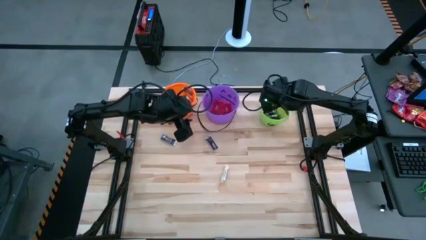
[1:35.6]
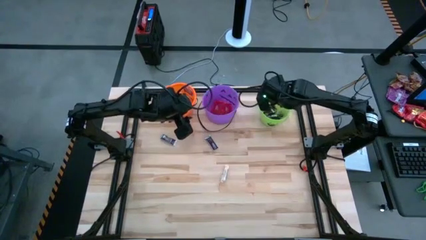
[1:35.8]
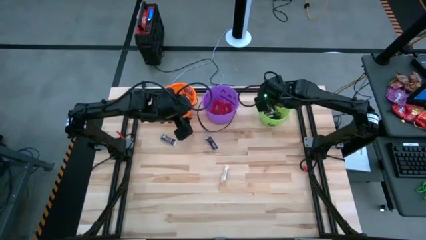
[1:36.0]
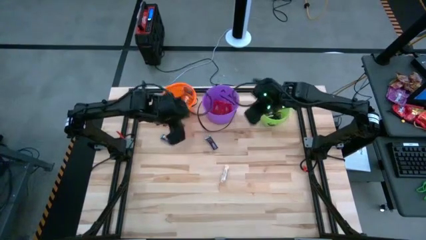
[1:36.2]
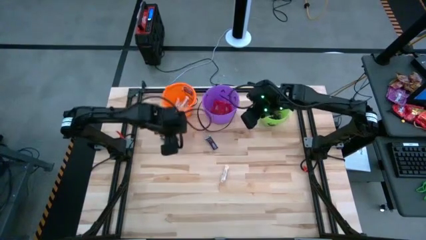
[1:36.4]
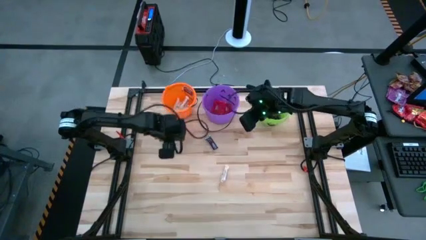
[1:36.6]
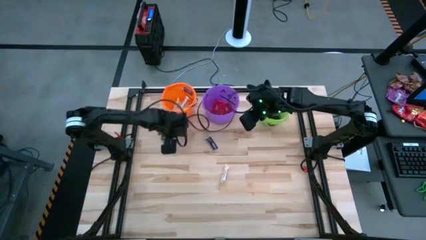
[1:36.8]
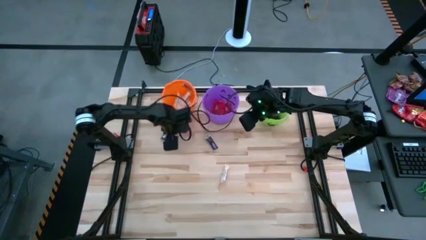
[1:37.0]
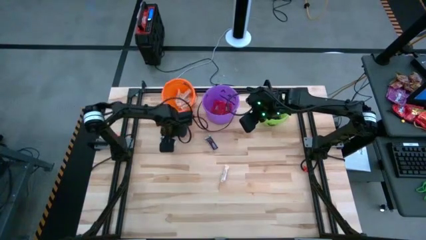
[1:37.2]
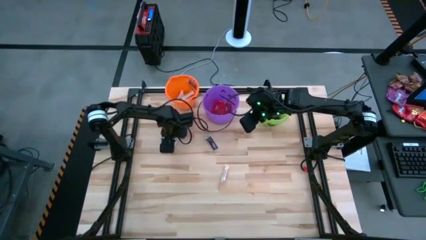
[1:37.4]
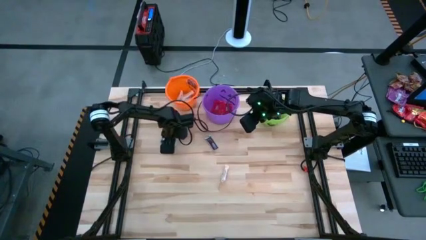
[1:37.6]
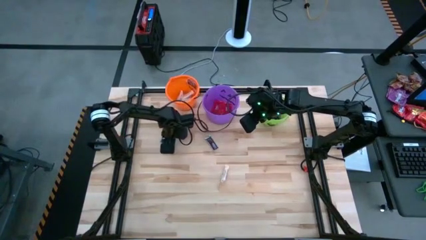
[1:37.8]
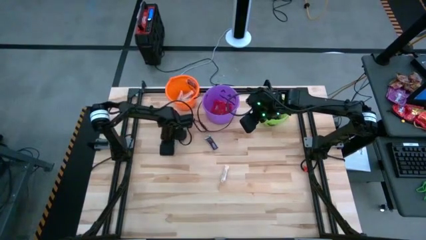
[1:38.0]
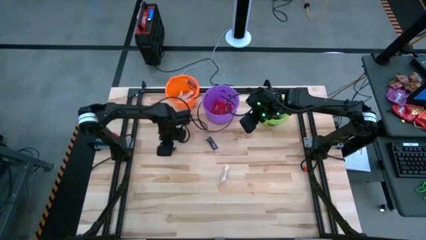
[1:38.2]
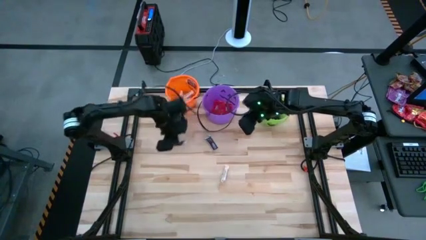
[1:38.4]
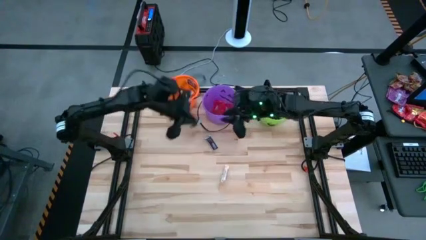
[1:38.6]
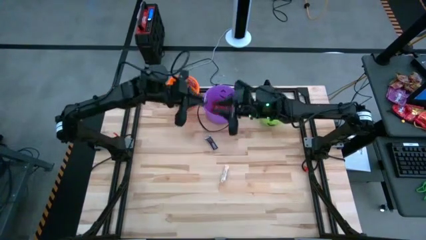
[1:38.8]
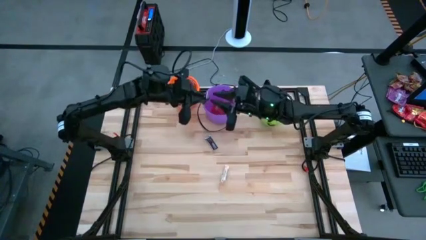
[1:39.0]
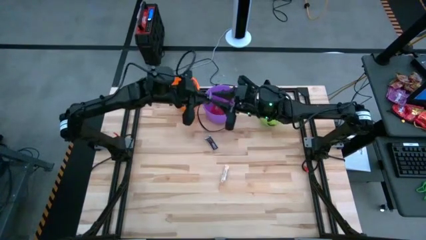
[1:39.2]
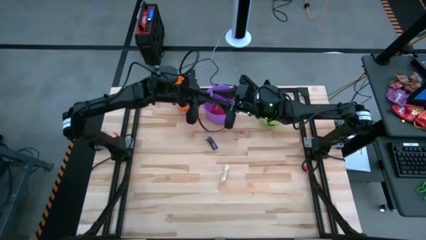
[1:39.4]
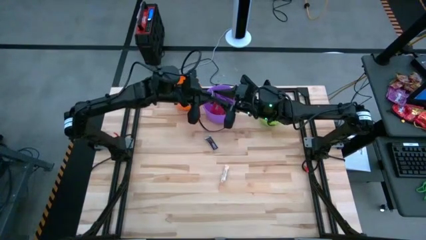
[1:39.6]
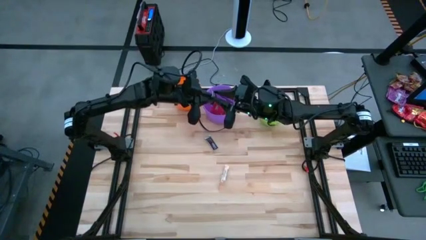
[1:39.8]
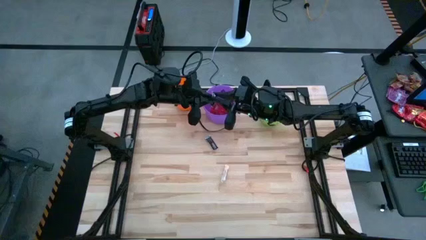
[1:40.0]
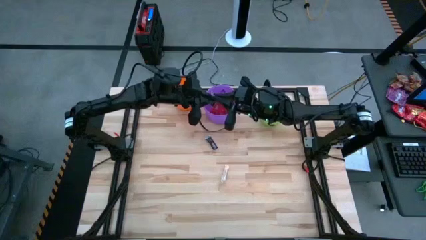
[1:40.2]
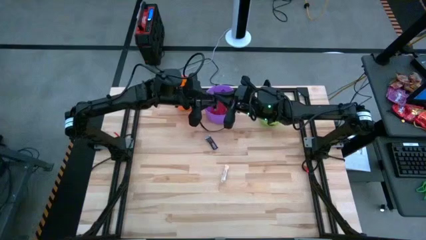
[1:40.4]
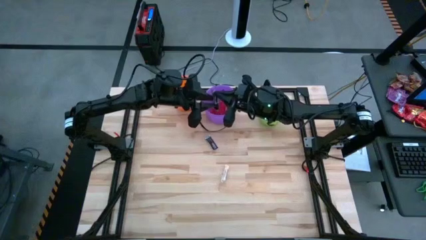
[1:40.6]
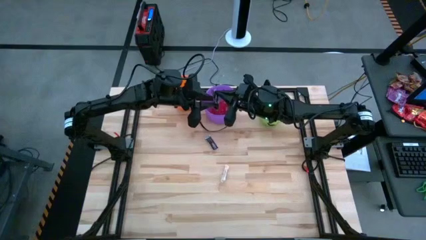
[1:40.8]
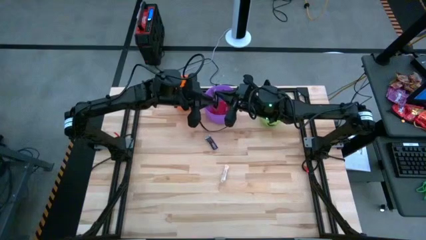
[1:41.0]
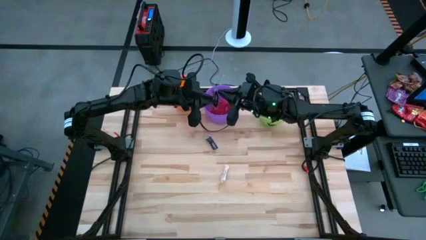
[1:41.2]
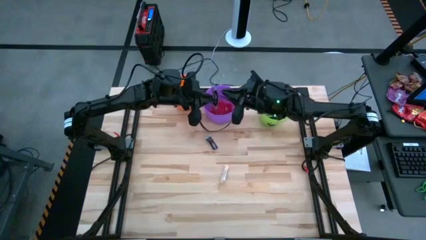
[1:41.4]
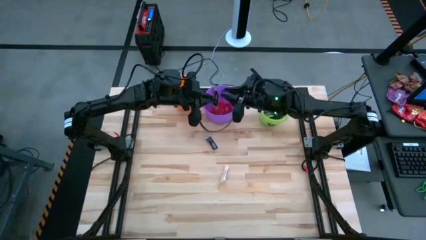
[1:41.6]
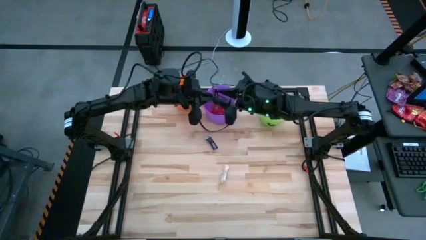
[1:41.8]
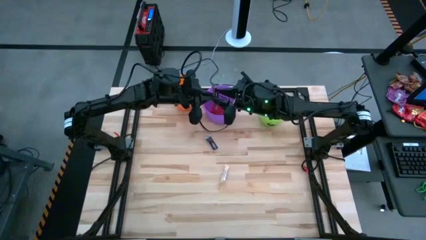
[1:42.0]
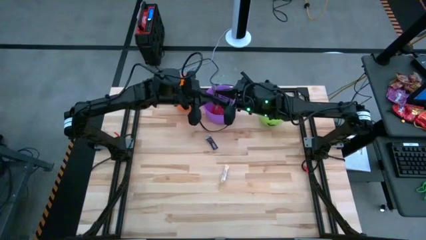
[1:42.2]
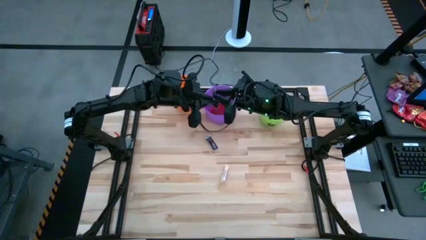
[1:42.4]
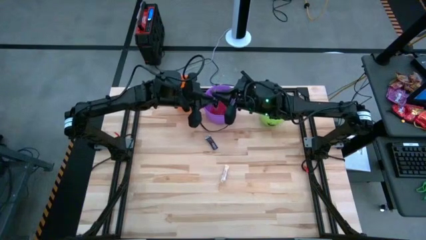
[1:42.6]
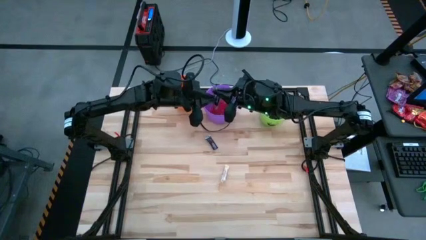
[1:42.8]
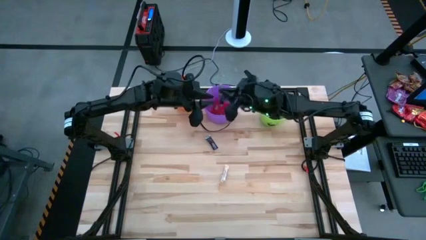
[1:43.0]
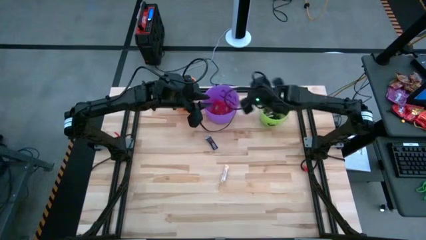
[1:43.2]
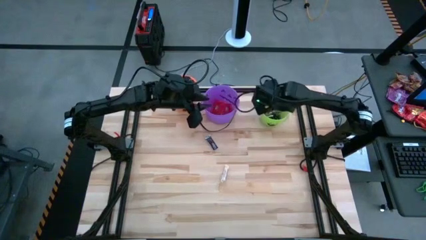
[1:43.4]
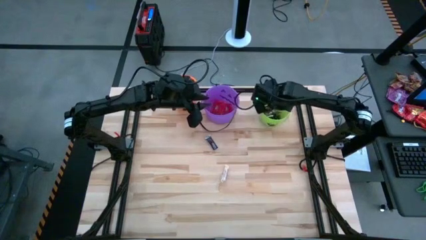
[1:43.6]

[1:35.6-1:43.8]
Task: Sort candy by brand, put in halloween buckets
Put the brown chocolate bar into the green bucket

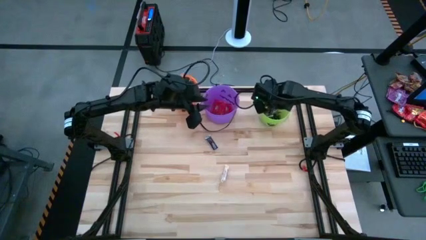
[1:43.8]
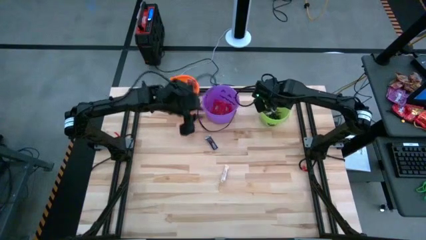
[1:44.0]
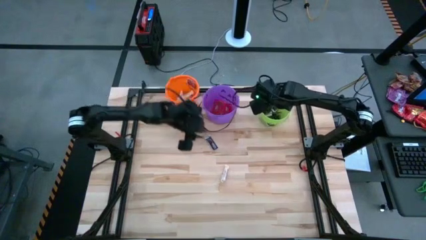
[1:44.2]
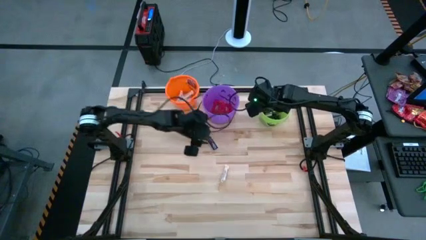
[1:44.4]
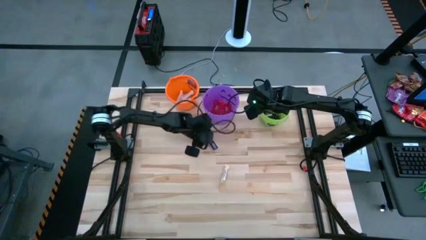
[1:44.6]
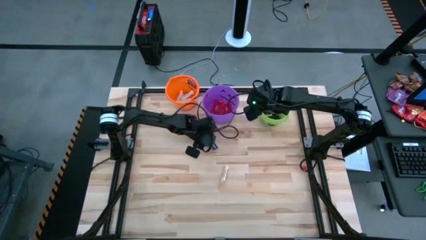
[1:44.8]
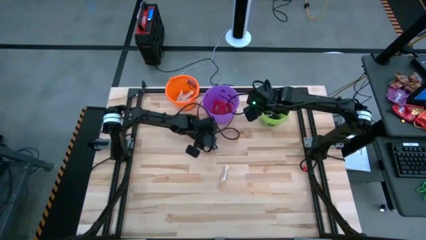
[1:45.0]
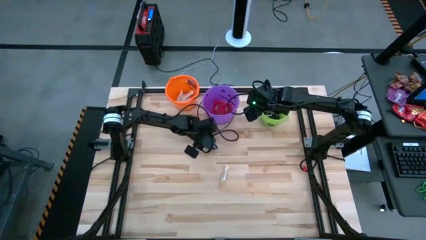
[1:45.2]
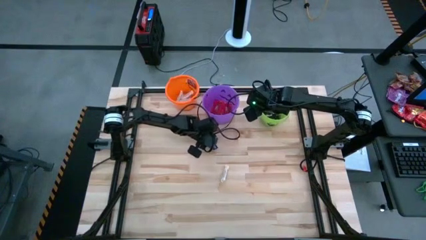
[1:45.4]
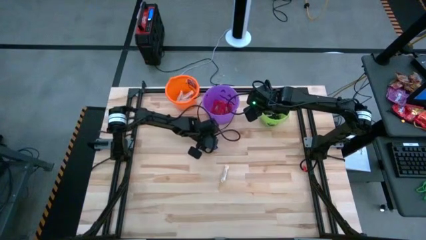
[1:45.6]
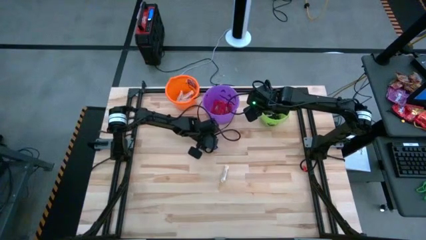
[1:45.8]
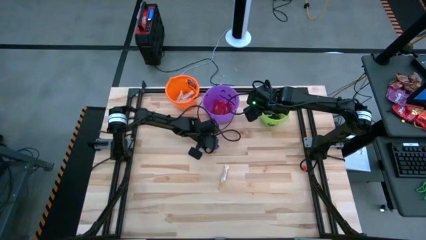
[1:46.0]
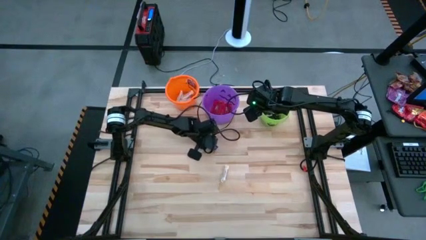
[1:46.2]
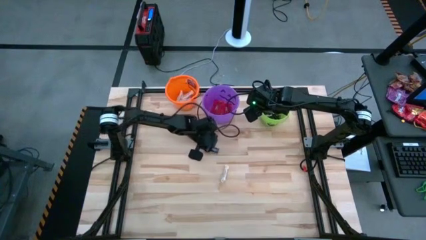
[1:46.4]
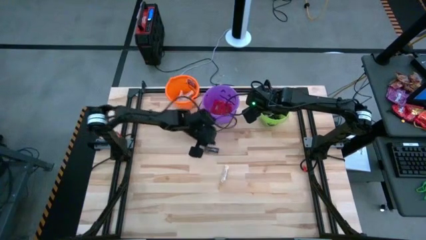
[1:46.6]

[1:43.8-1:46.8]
Put the brown chocolate bar into the green bucket

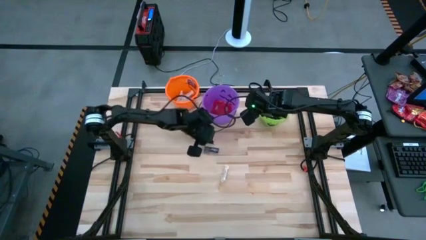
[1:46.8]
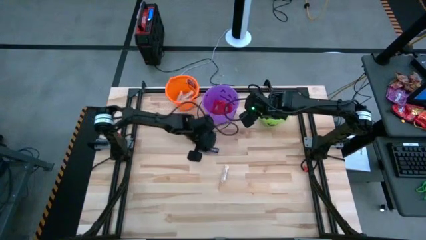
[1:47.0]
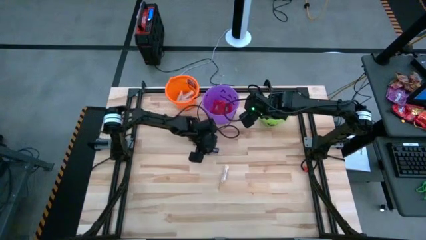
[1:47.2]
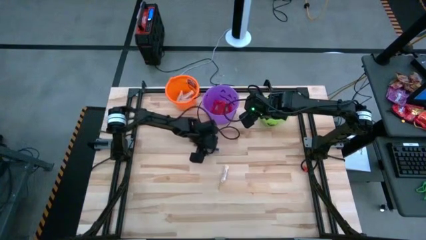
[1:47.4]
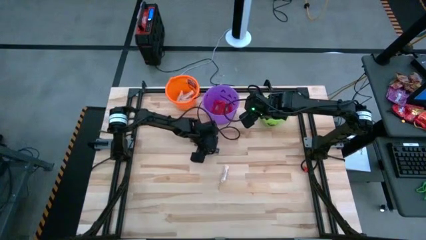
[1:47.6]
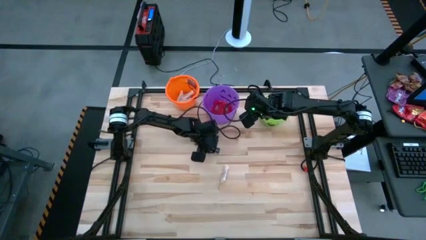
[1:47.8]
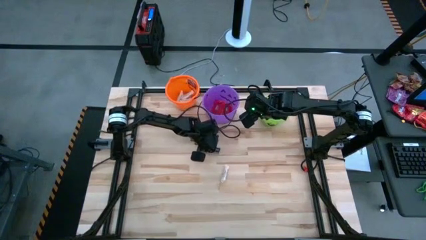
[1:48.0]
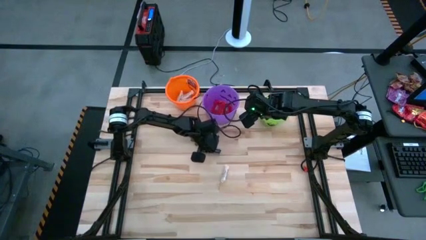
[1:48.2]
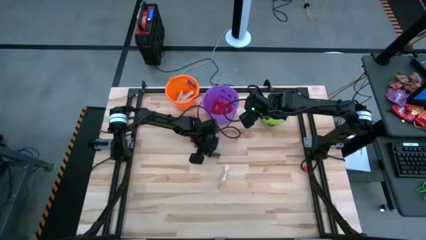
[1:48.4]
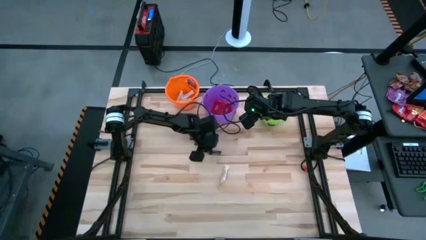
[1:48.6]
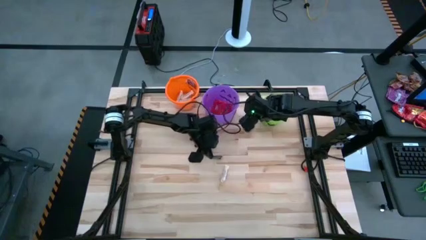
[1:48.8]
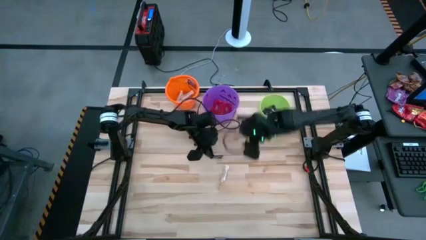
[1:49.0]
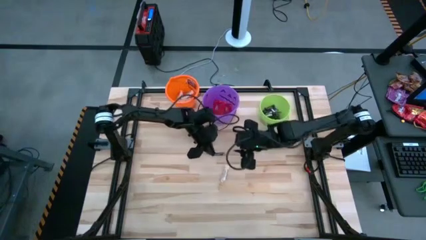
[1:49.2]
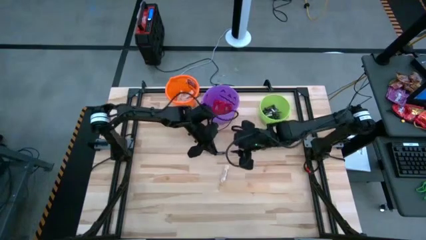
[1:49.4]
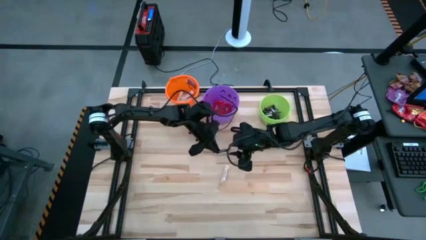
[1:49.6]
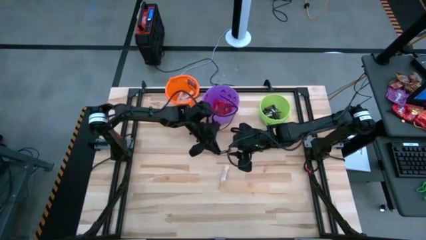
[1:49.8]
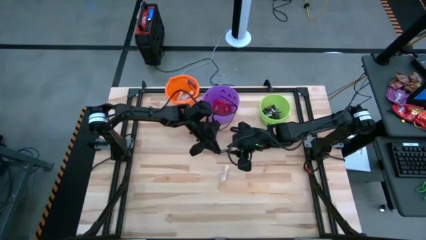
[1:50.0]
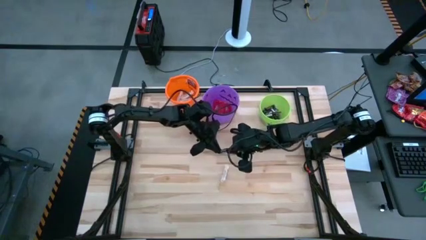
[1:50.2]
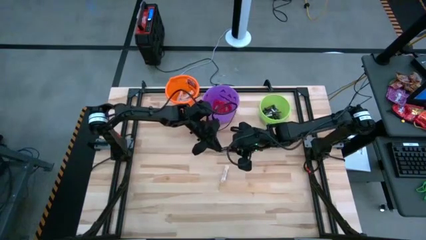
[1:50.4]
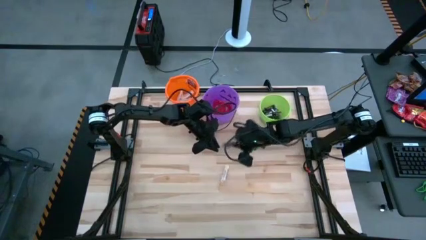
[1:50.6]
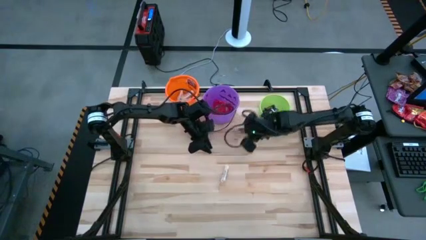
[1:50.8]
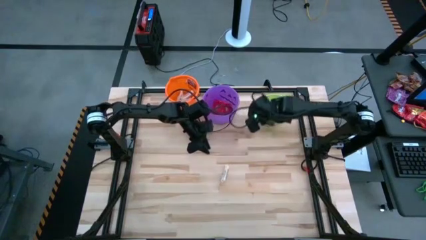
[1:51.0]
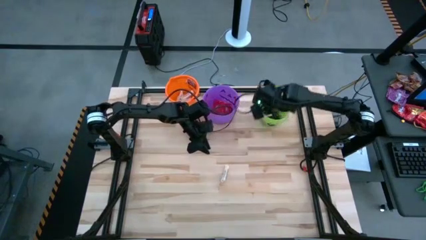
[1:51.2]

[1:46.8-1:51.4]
Put the brown chocolate bar into the green bucket

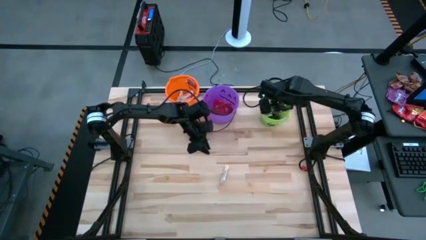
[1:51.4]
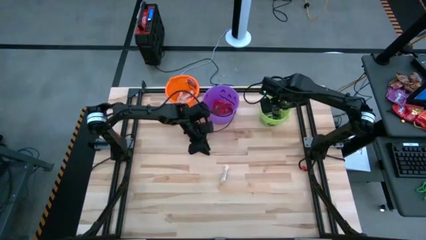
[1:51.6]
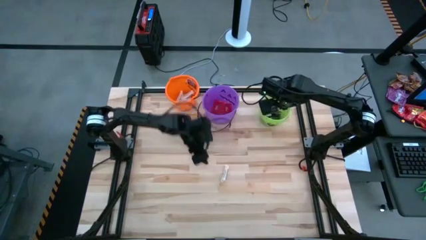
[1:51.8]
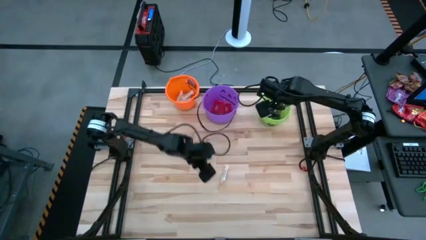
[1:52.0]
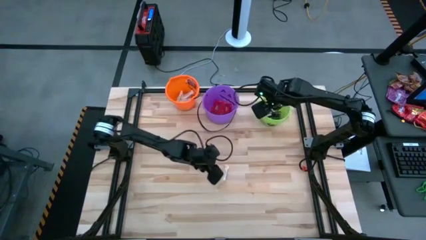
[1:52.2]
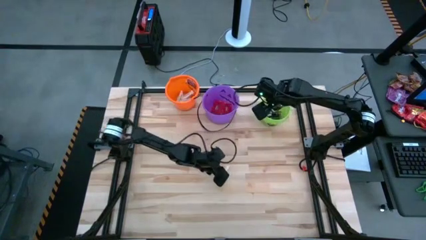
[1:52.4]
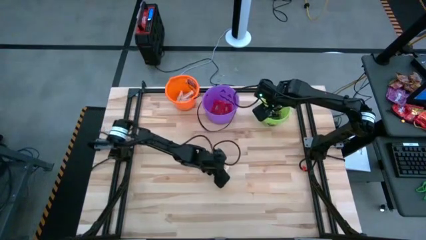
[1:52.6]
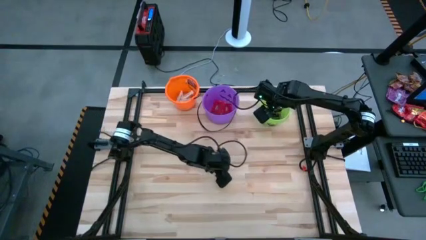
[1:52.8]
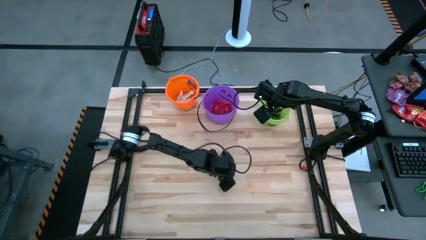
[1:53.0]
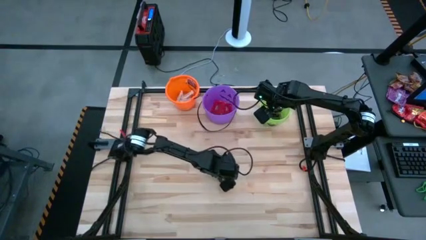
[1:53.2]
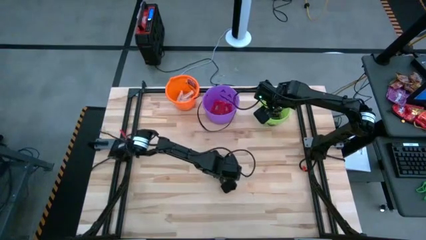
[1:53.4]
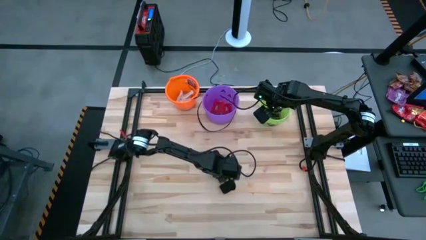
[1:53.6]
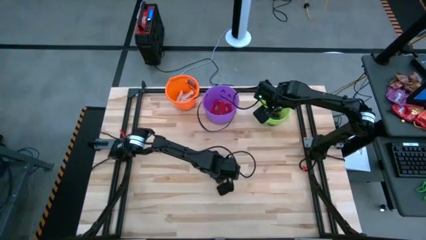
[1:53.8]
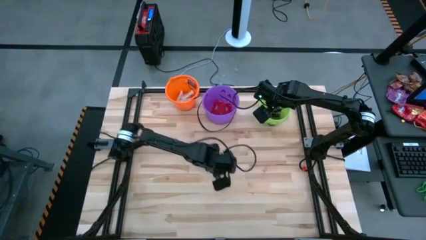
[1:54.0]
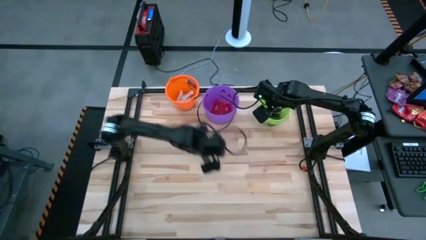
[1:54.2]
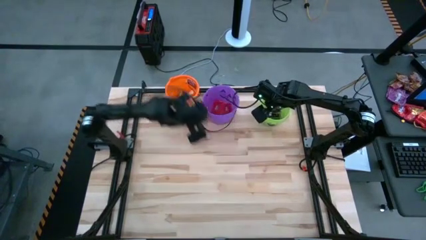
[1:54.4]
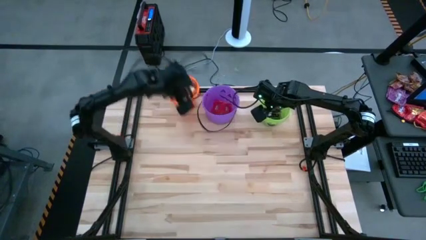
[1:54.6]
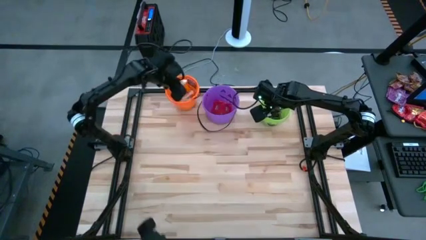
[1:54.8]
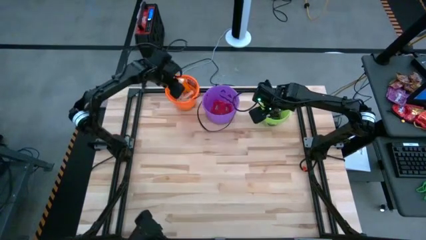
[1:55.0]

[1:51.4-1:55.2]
Put the white chocolate bar into the orange bucket
